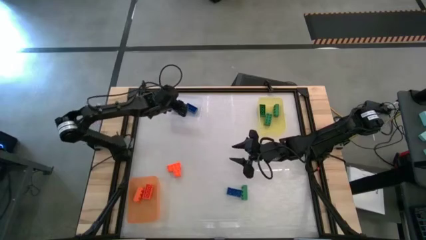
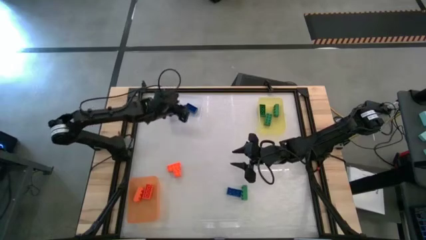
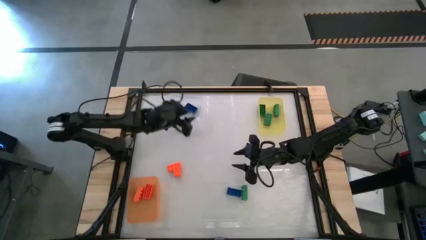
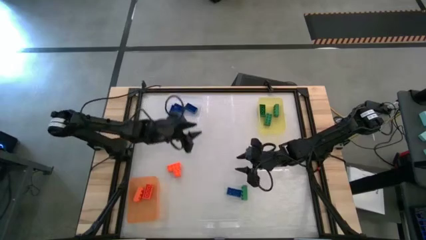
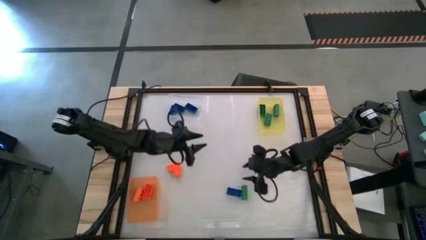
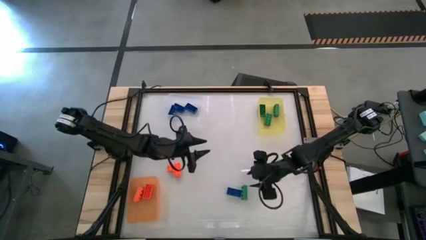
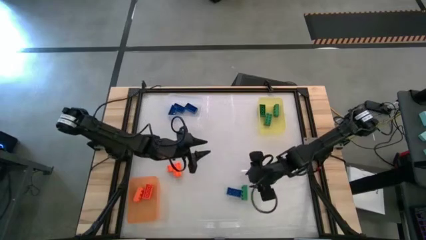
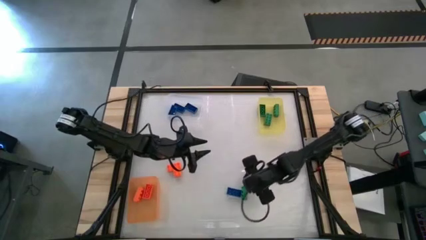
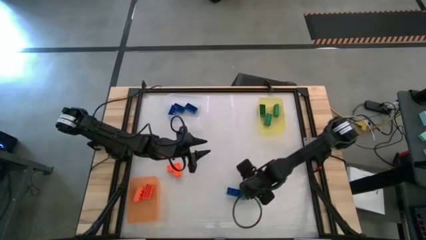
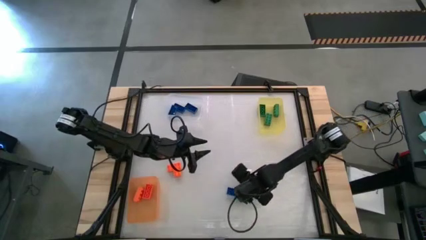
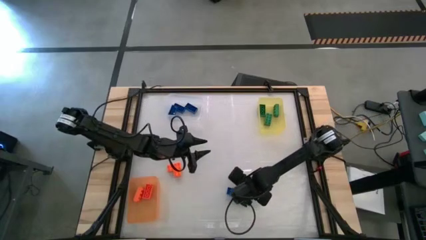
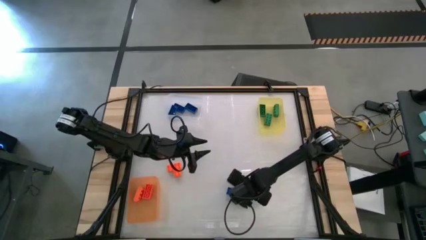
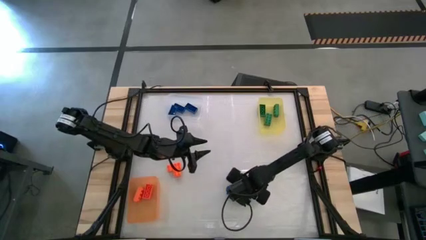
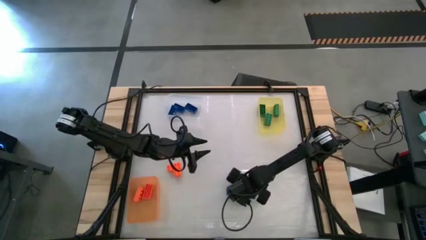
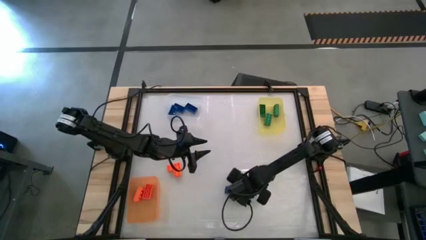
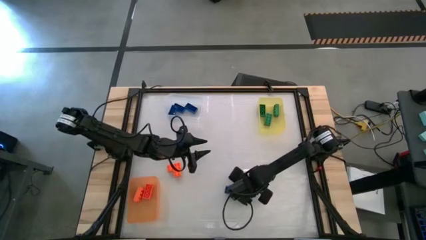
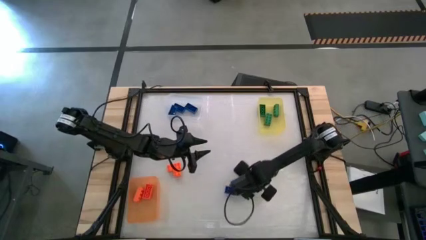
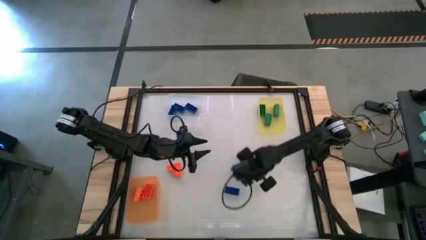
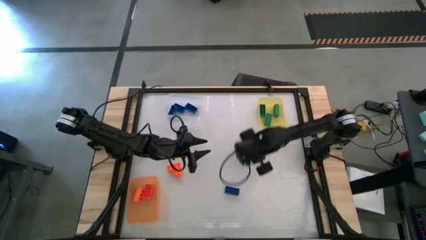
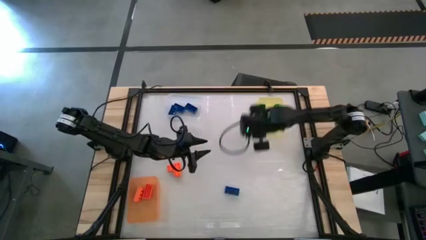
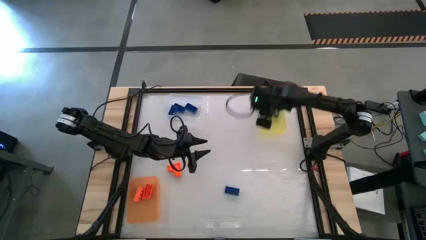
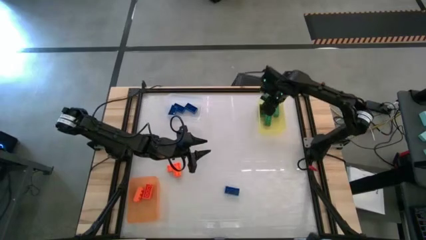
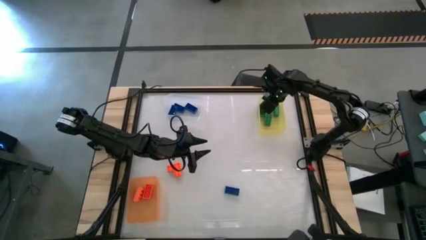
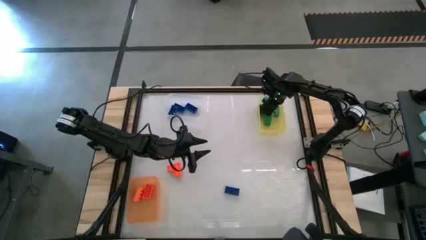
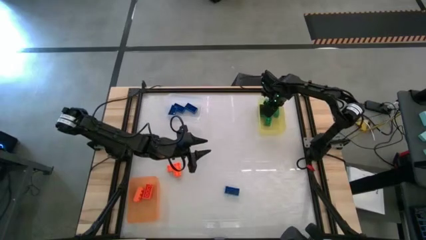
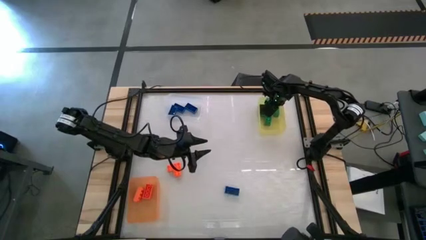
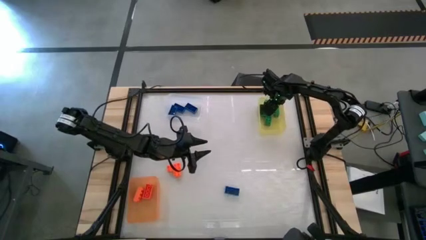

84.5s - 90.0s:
Task: Sort & place blocks by color
Put the green game piece into the yellow bin

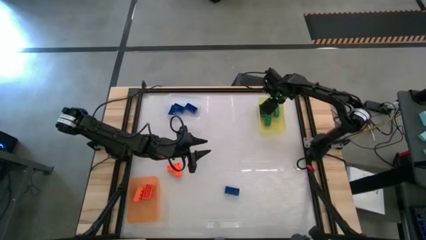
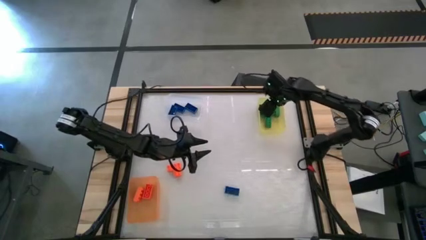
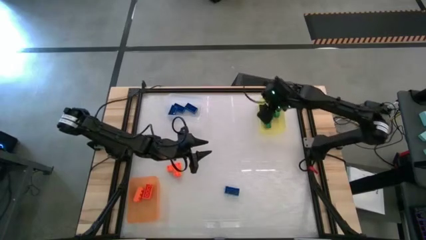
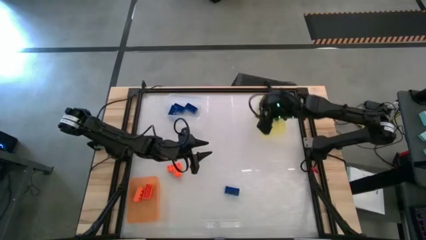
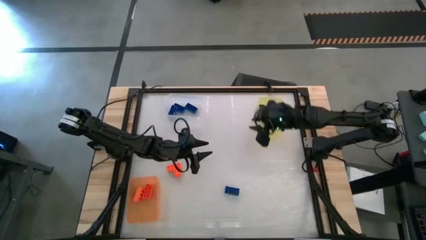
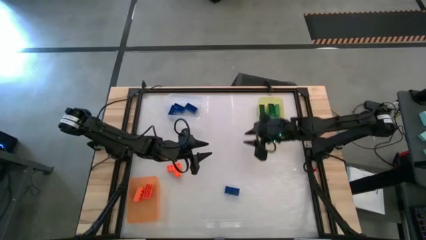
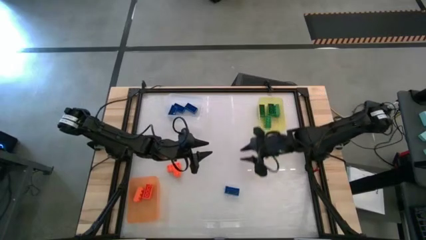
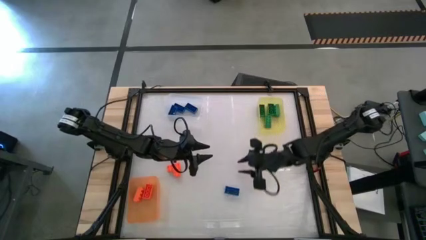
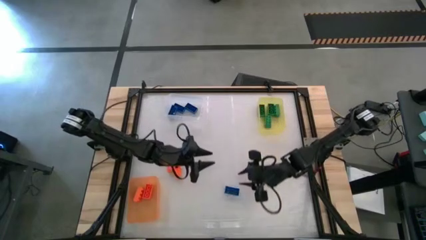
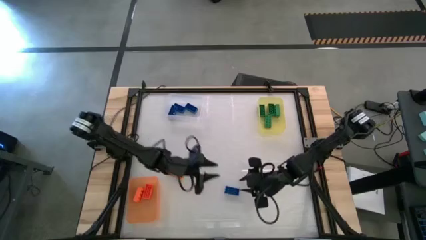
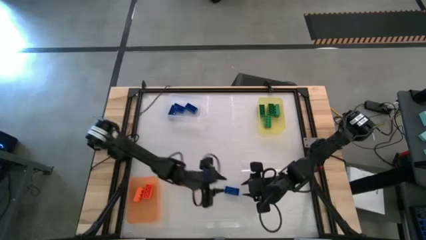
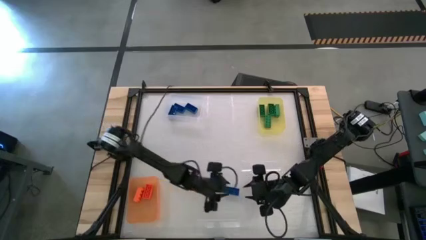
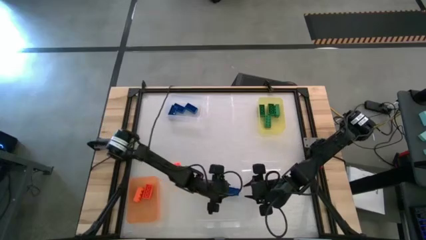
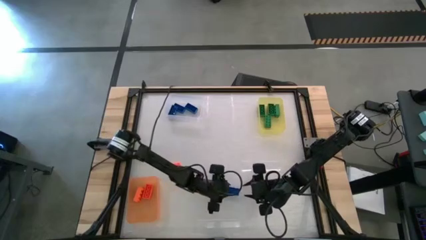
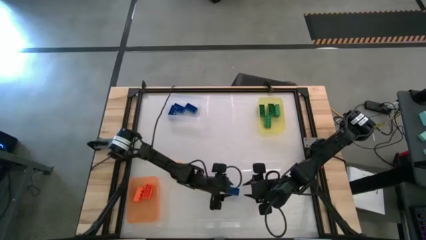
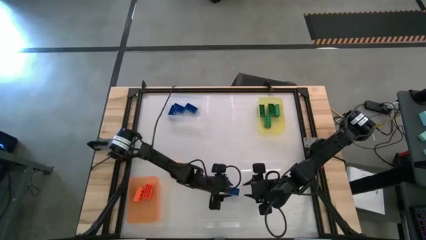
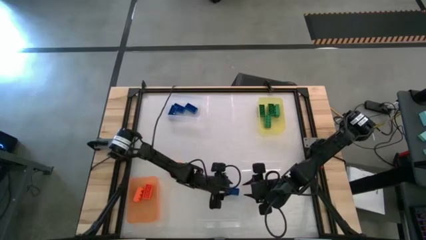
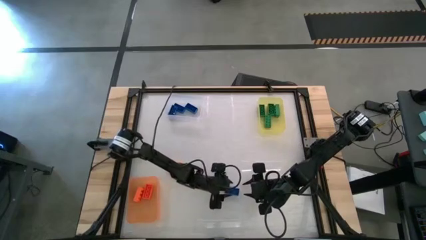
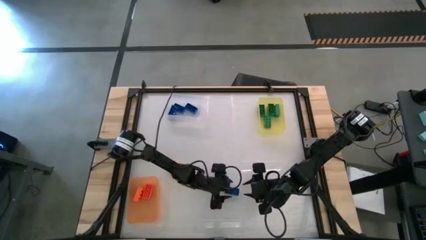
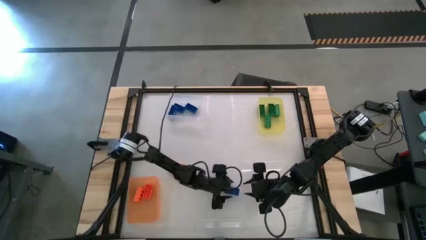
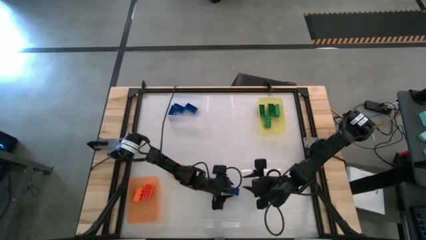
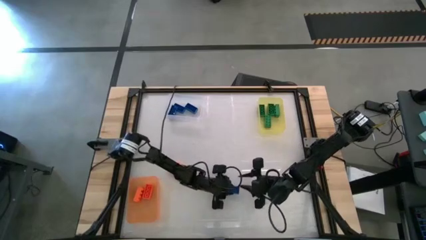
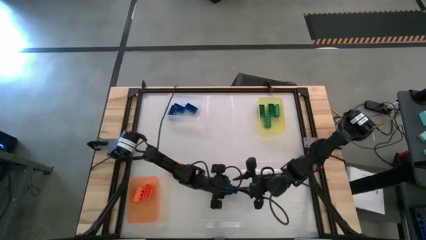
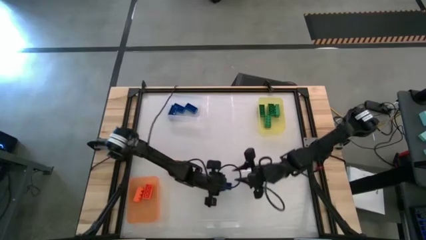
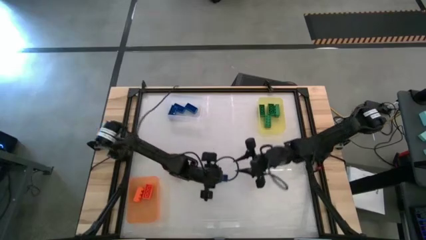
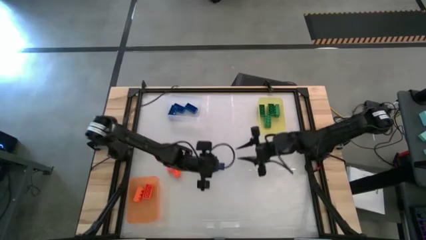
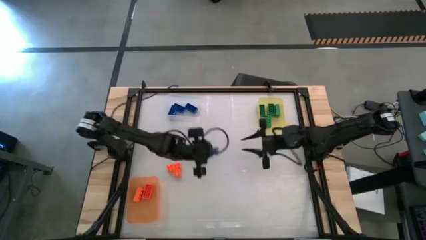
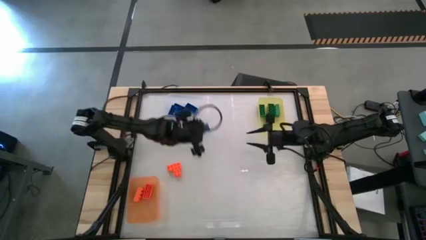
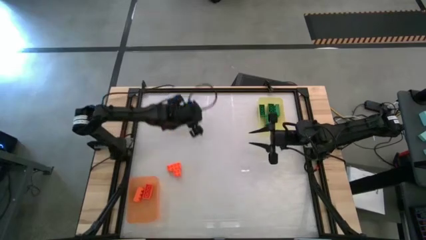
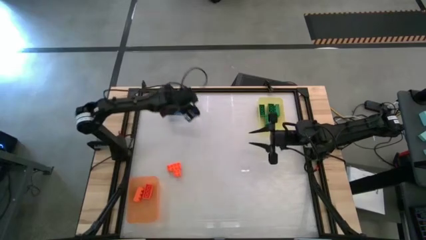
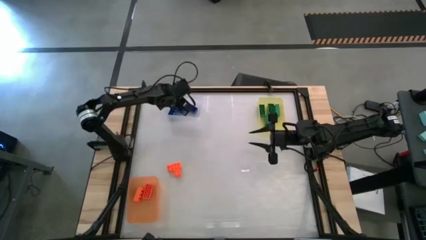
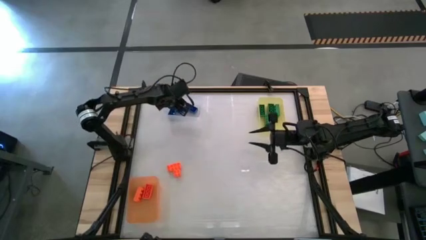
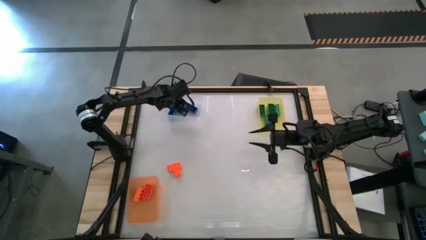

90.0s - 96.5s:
Put the blue game piece into the transparent bin

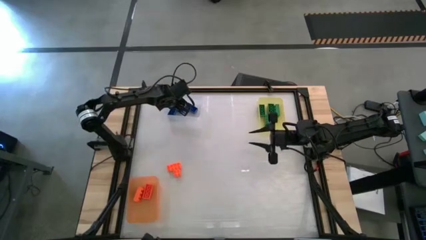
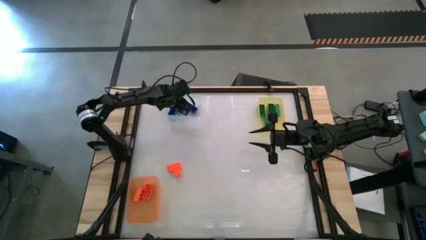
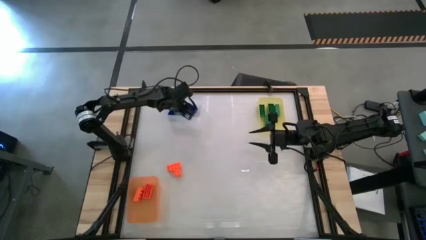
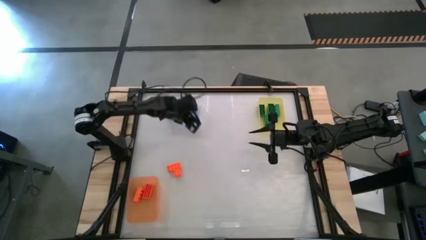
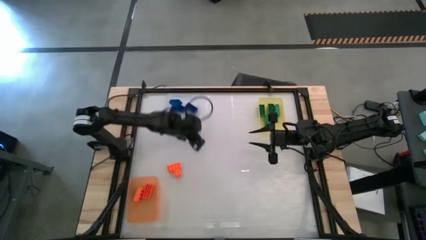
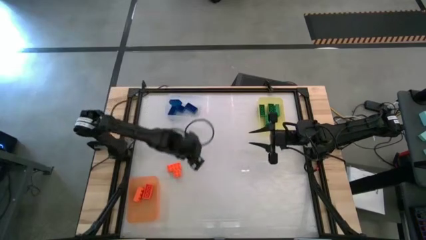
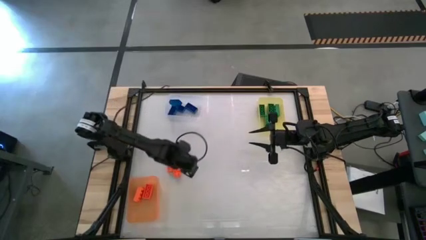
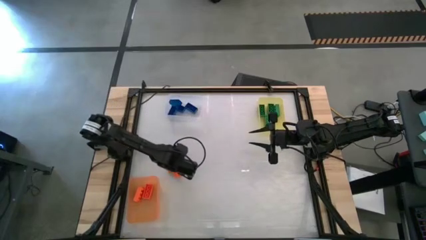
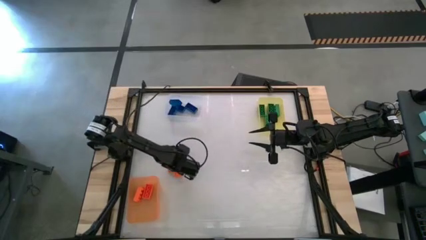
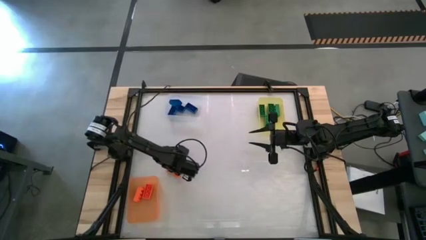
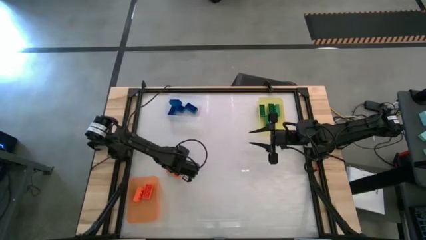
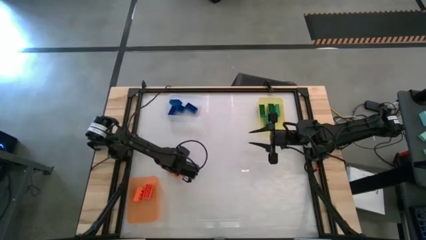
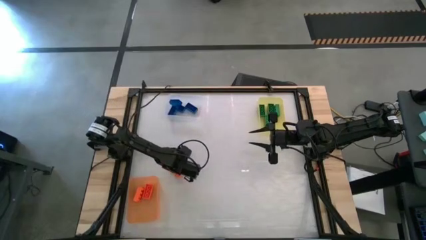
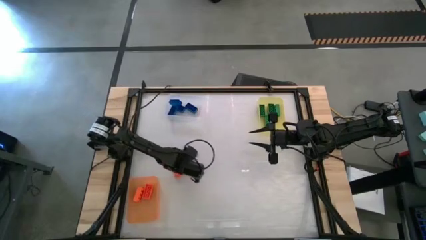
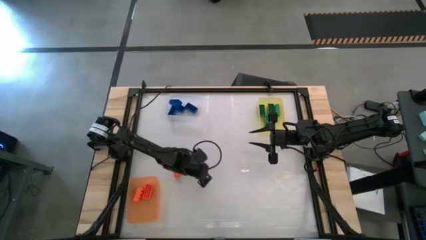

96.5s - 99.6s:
Put the orange game piece into the orange bin
